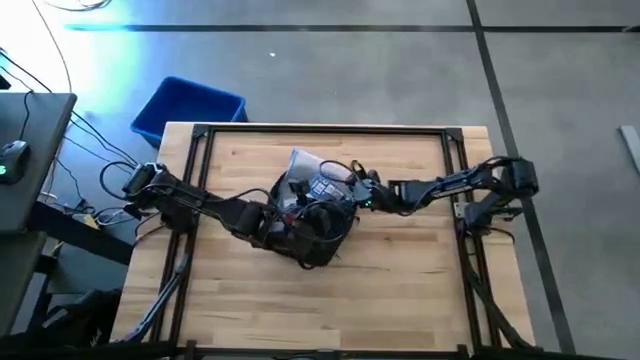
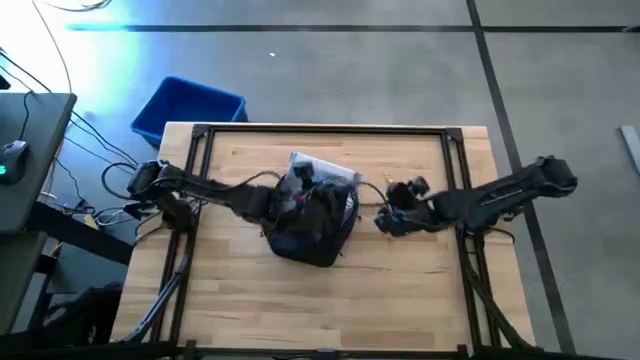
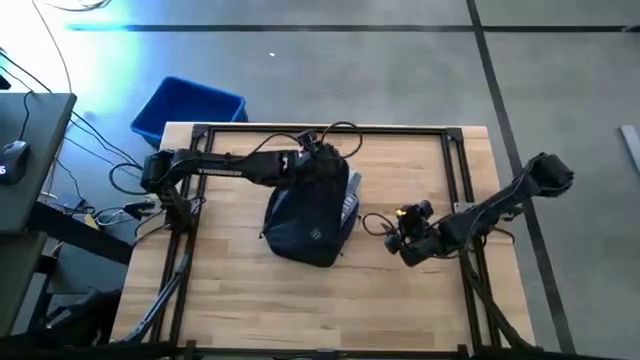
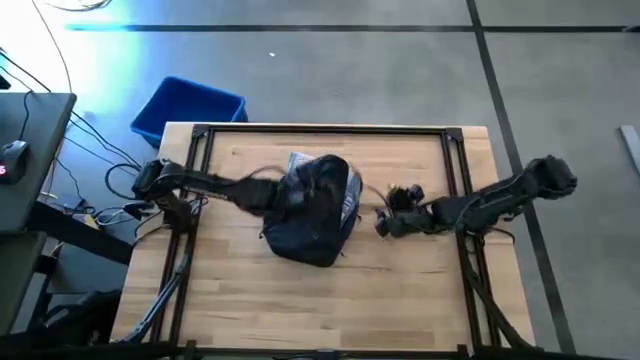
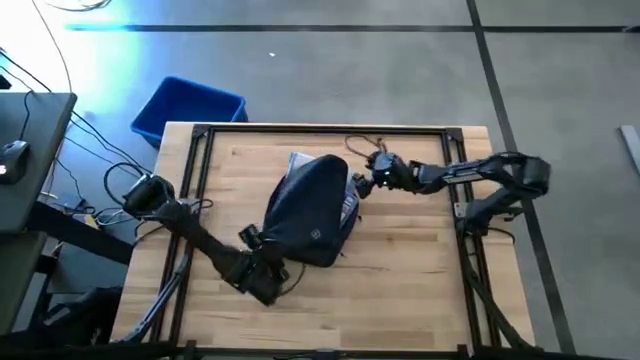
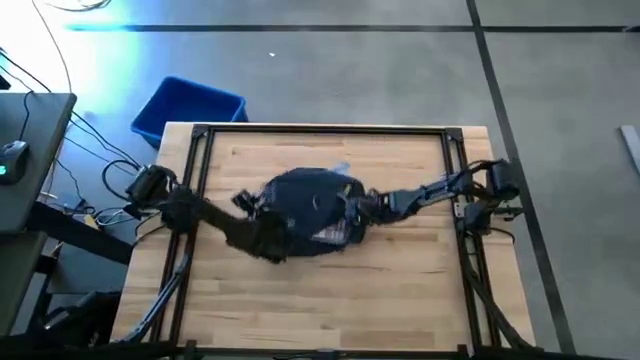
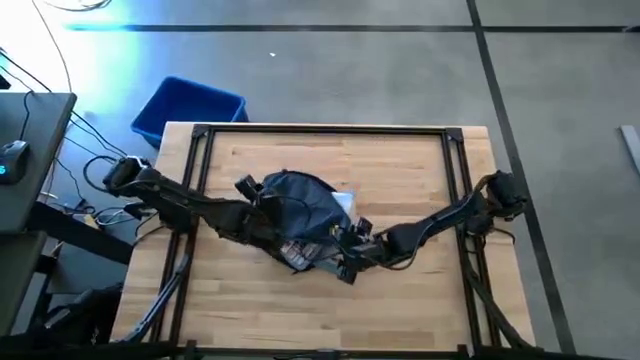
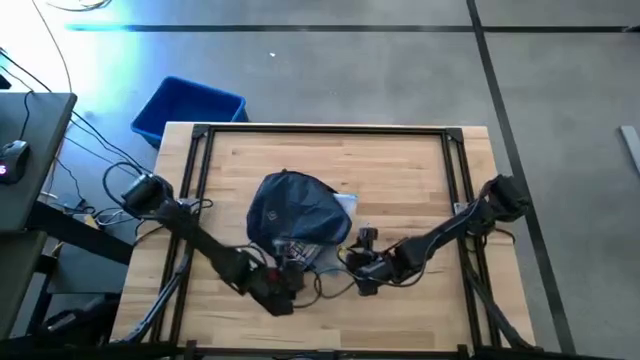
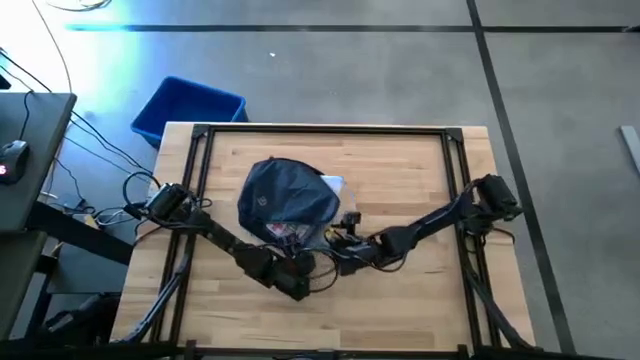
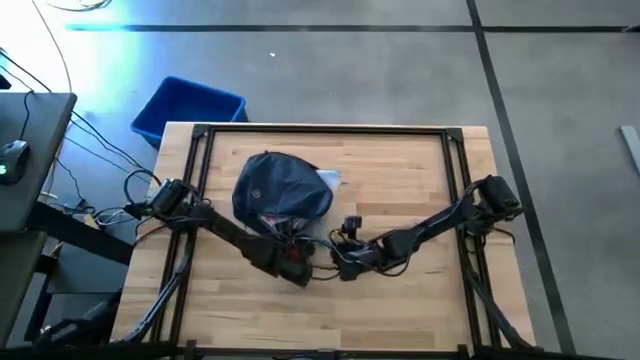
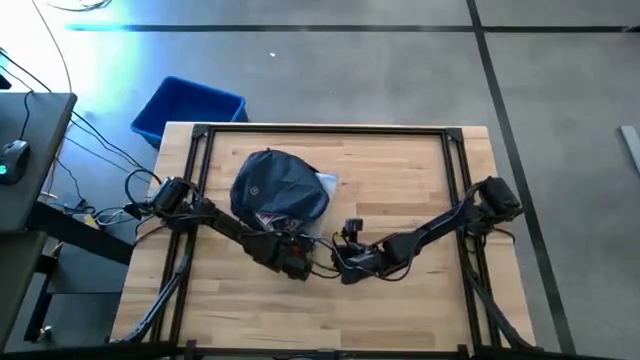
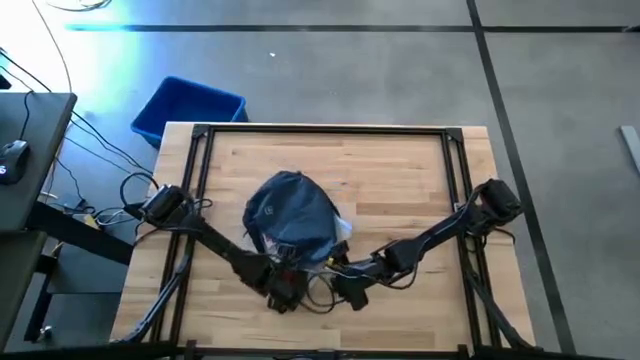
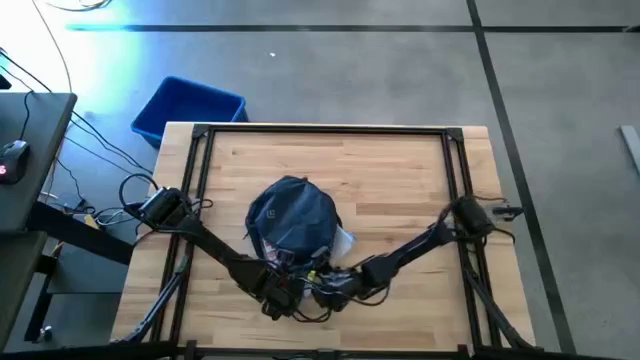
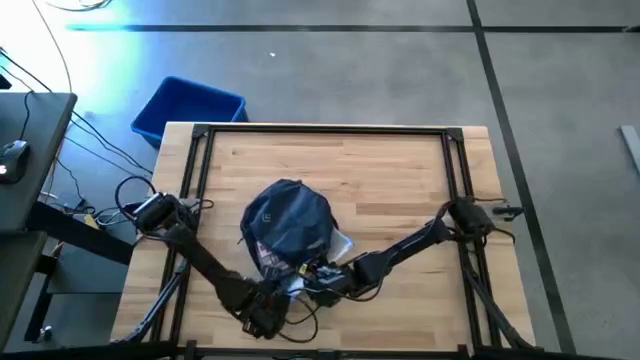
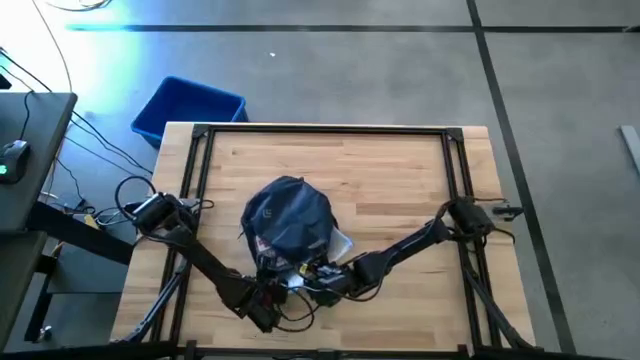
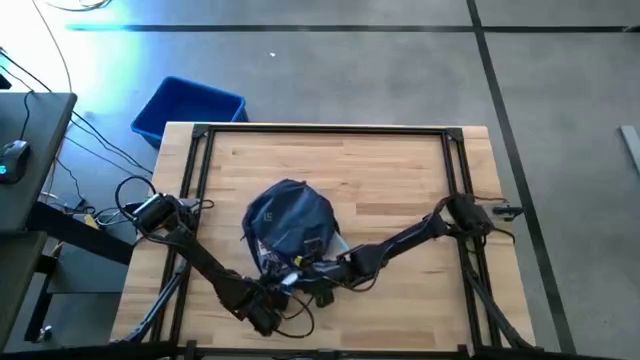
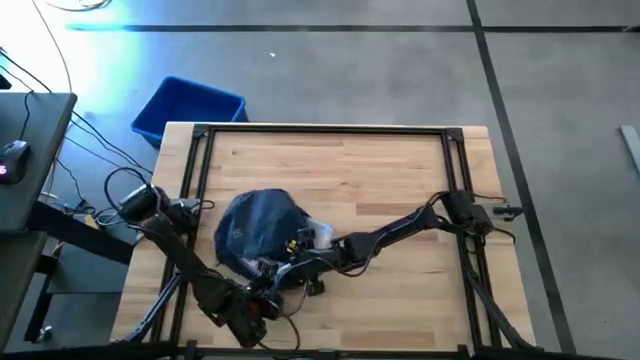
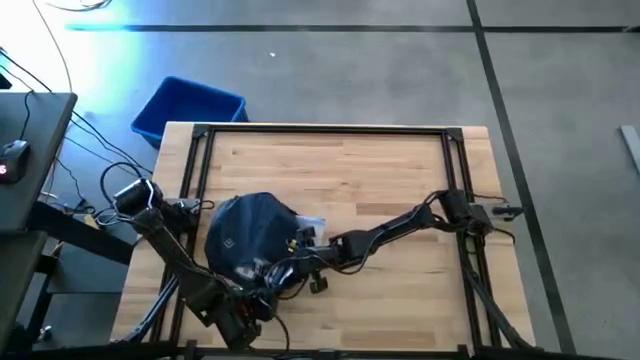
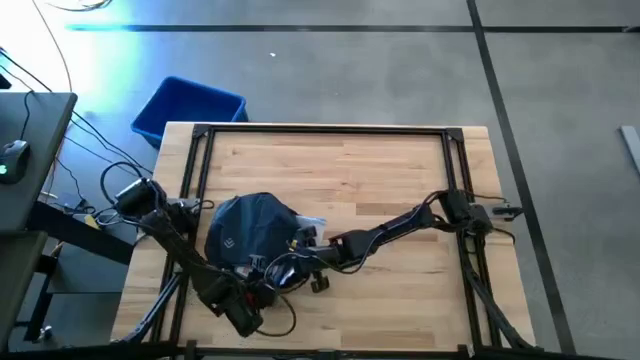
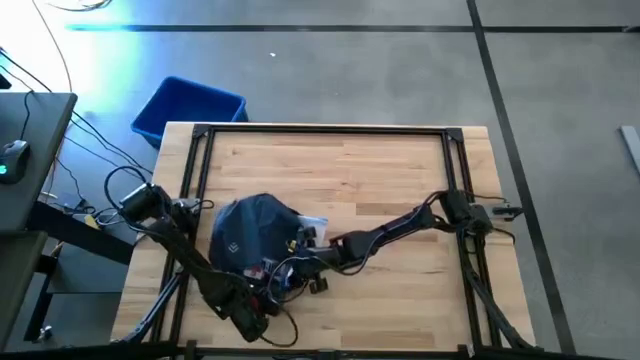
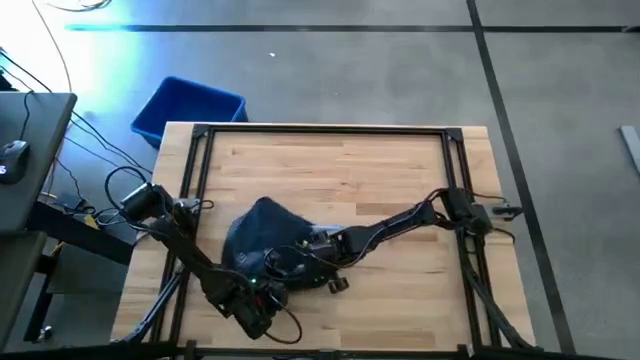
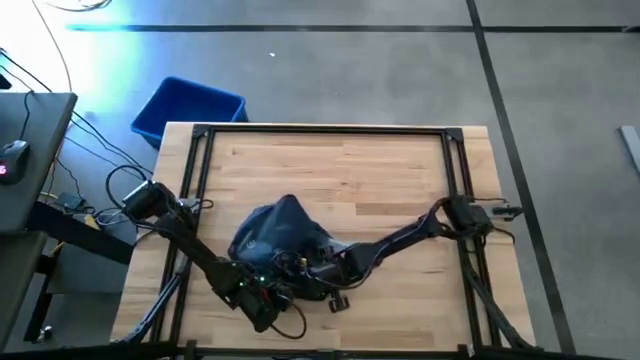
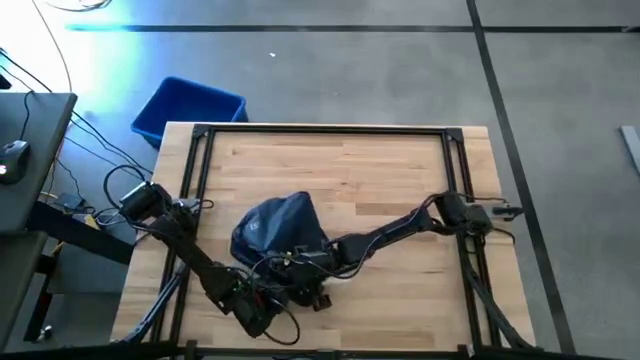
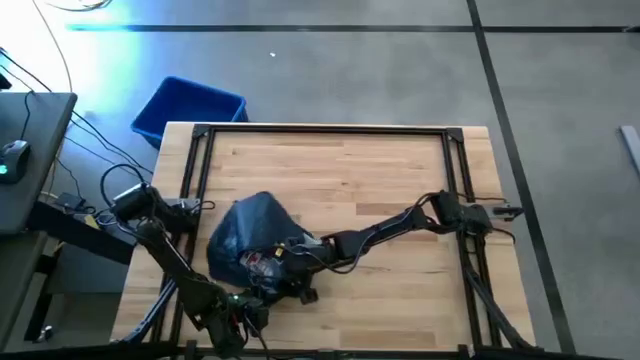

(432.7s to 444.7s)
Task: Unpack backpack
Adjust the white zip bag in the bag

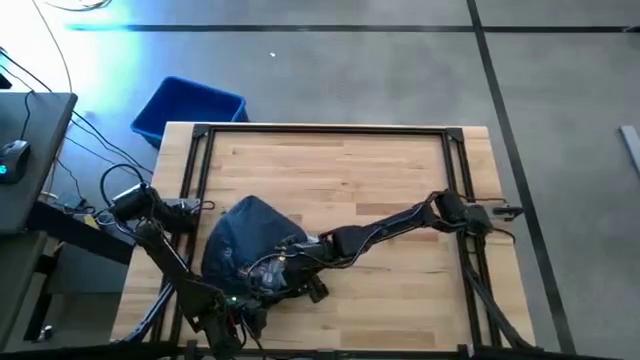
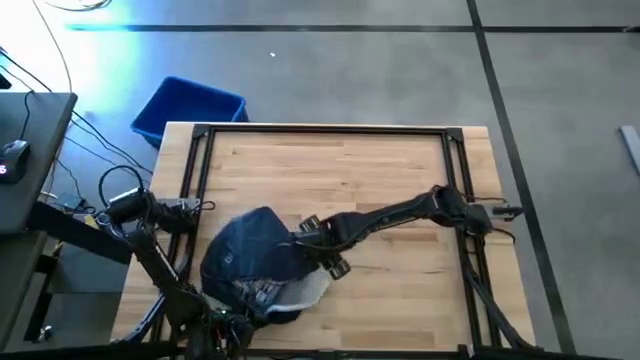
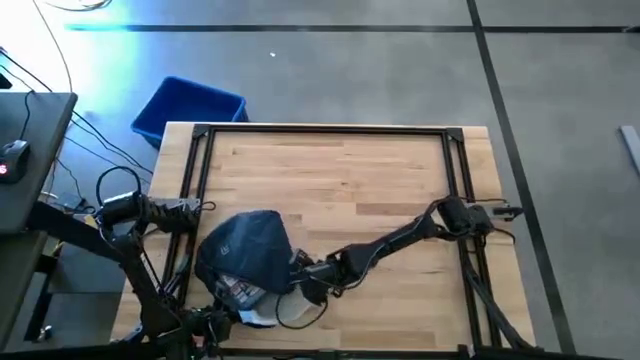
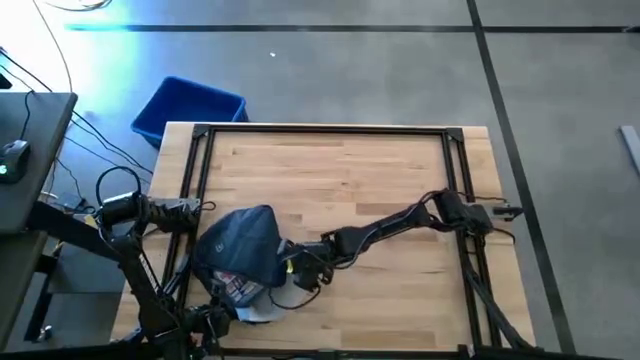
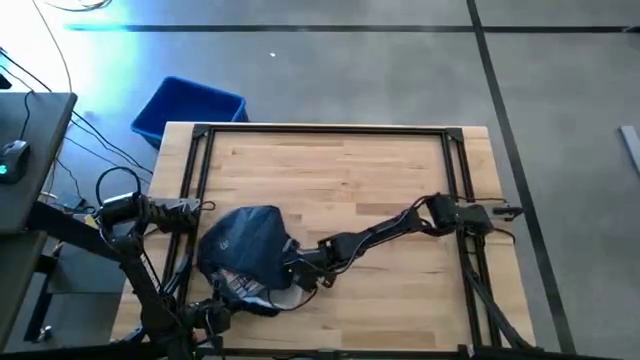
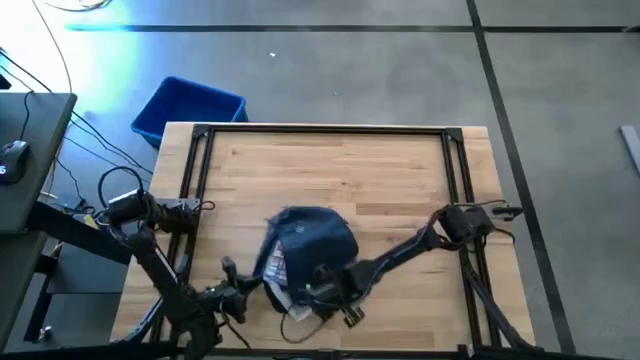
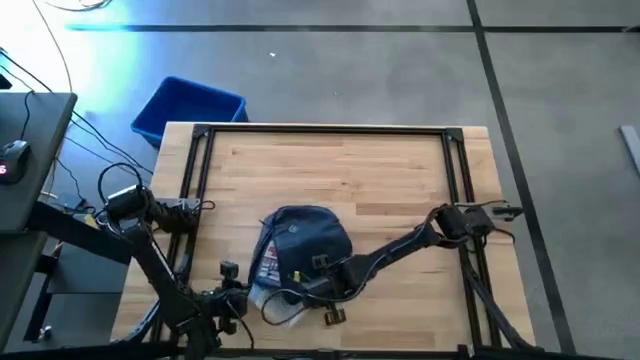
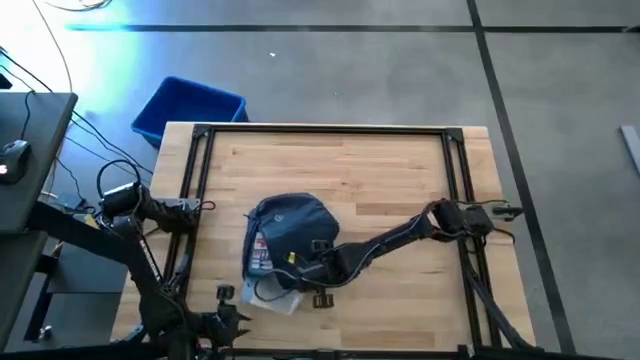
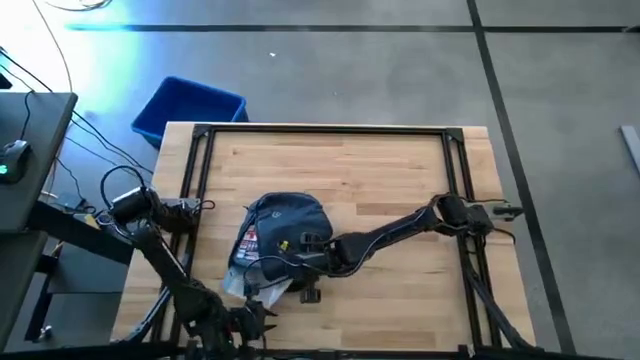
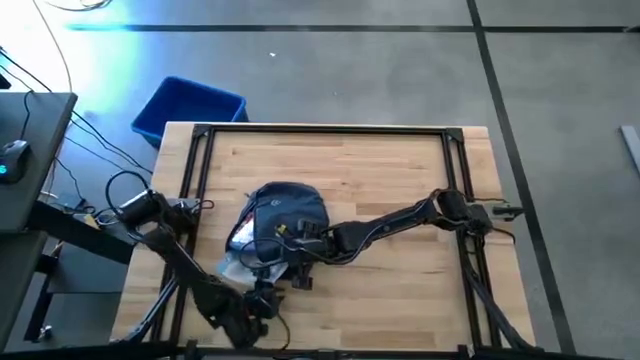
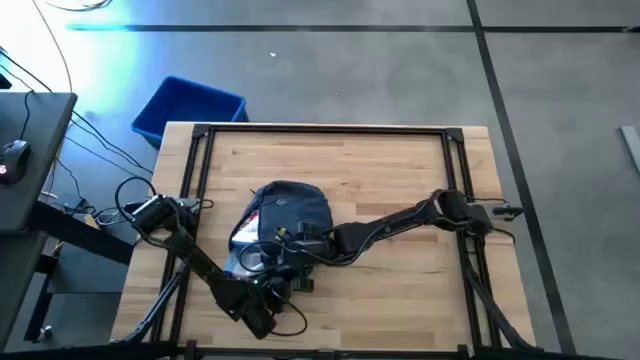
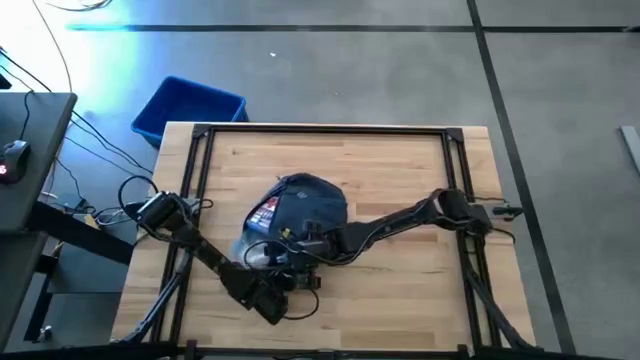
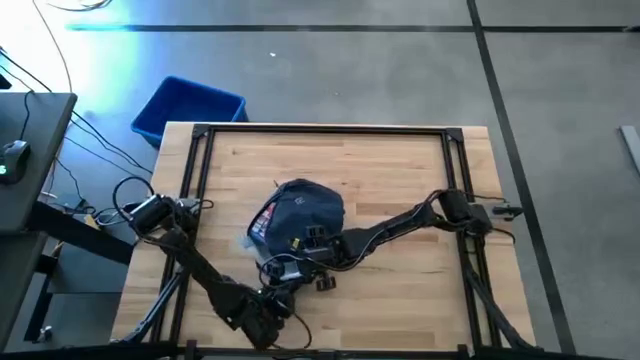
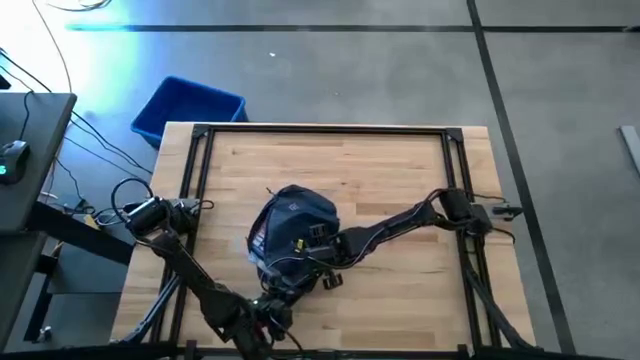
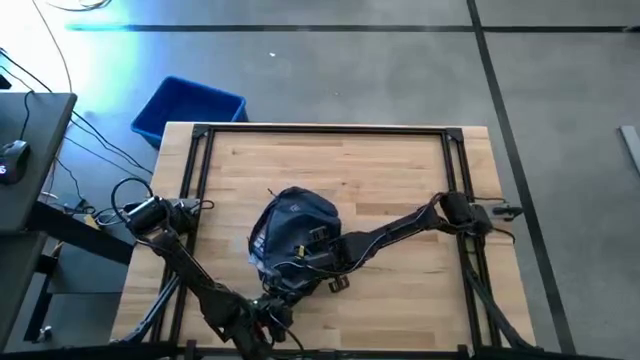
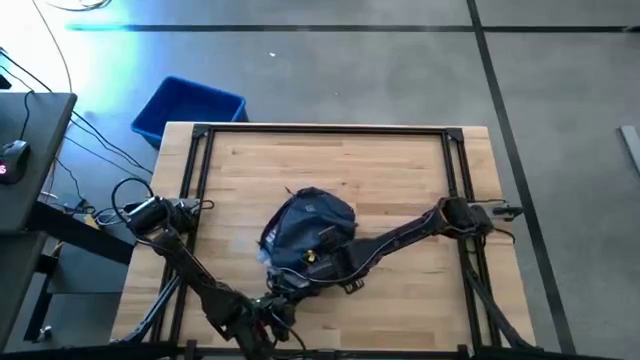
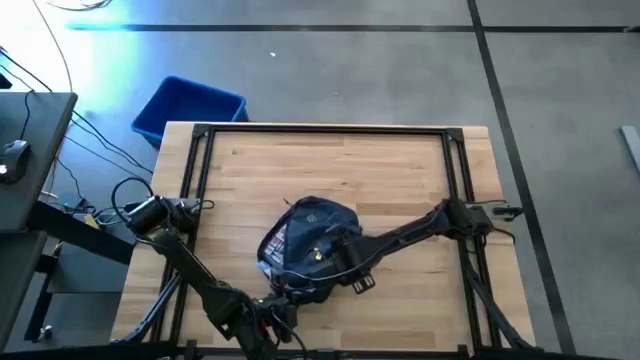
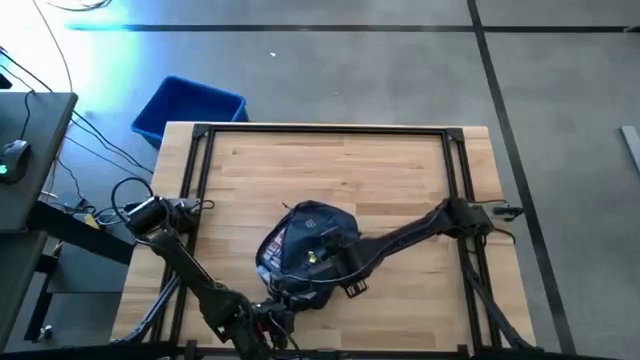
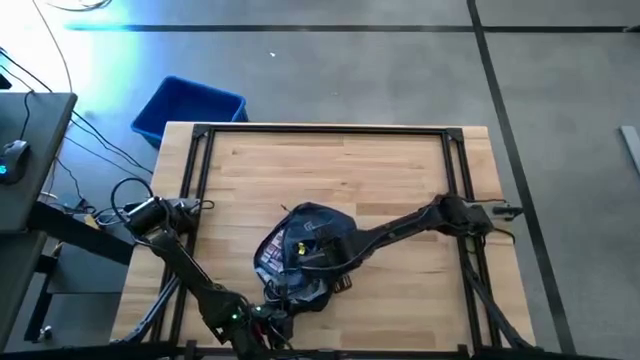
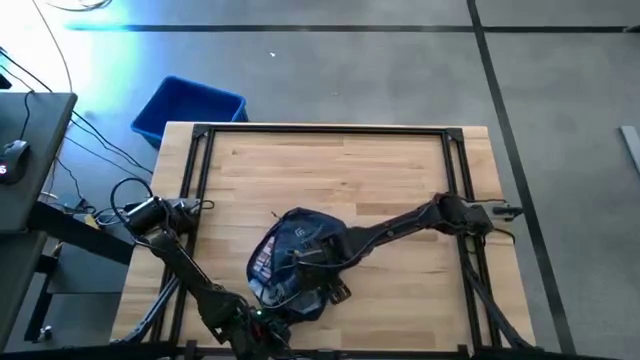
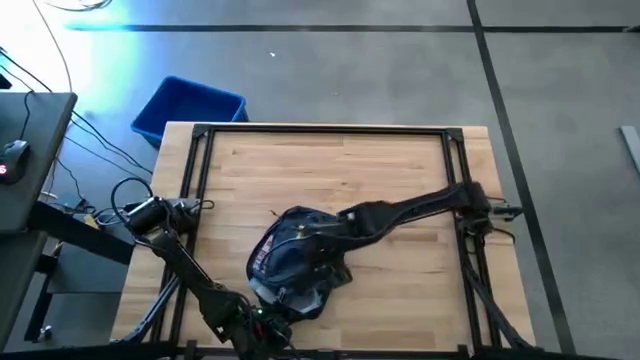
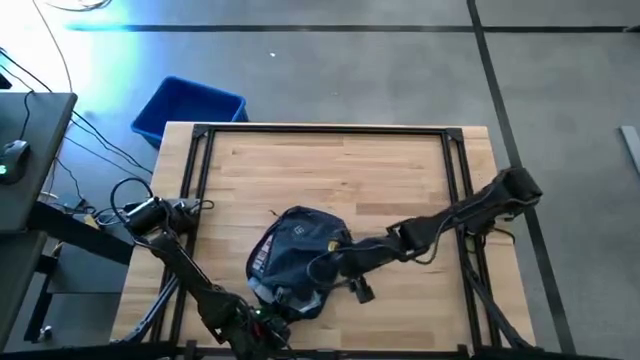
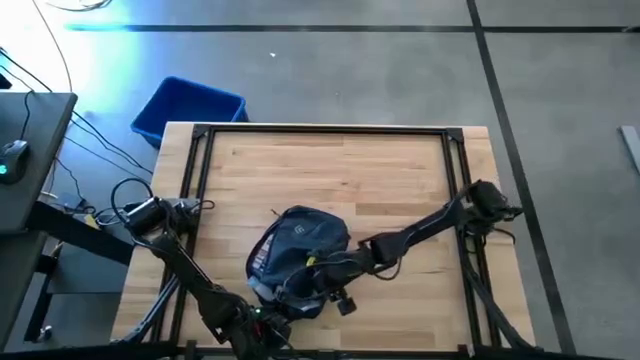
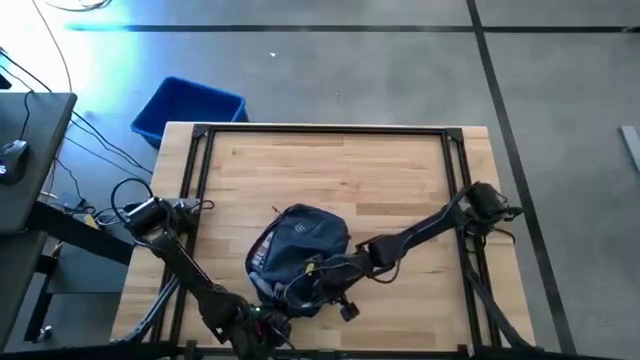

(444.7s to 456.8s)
Adjust the white zip bag in the bag
